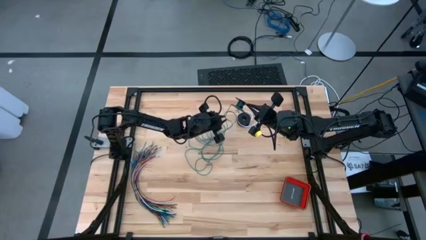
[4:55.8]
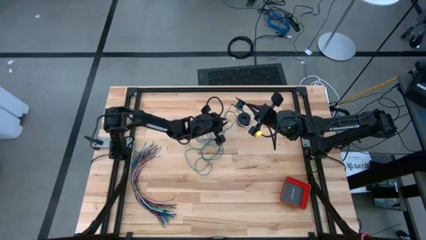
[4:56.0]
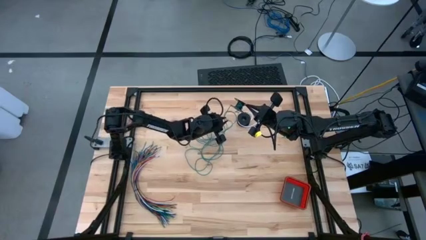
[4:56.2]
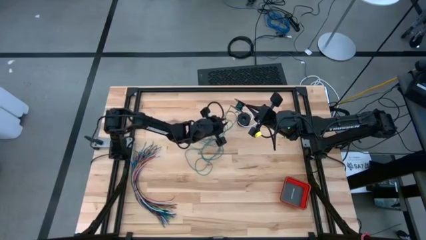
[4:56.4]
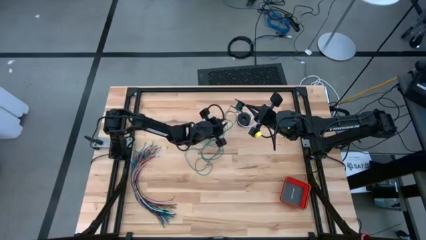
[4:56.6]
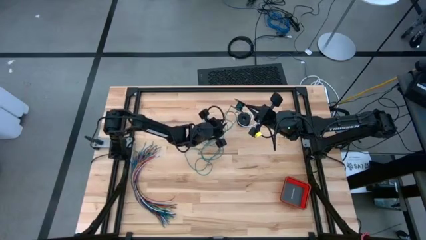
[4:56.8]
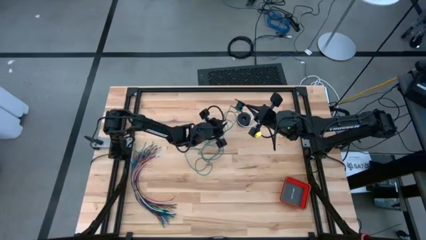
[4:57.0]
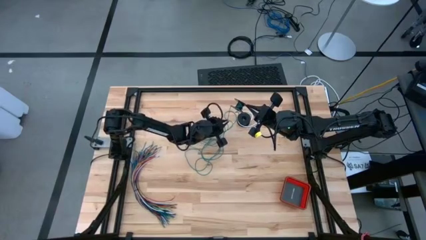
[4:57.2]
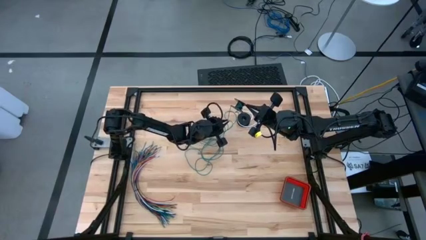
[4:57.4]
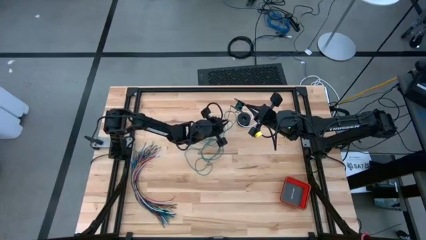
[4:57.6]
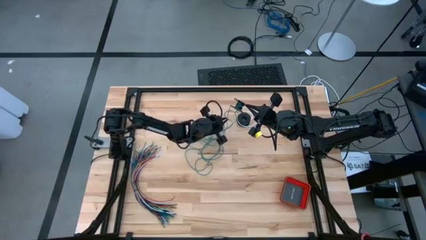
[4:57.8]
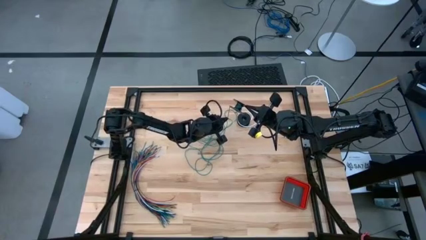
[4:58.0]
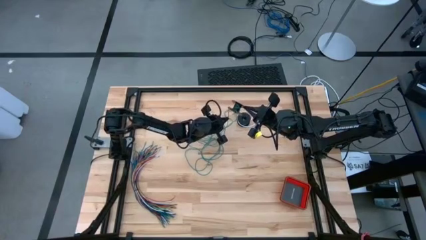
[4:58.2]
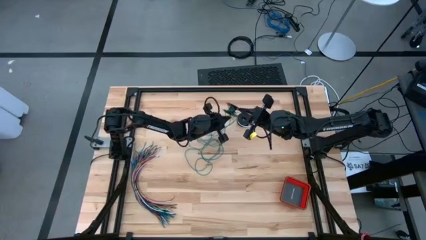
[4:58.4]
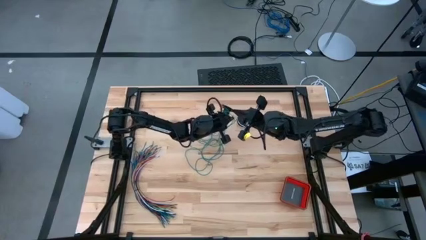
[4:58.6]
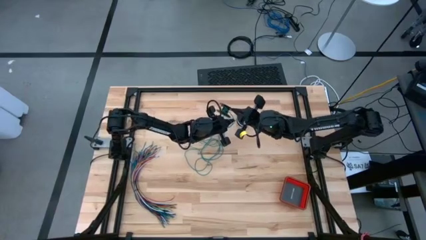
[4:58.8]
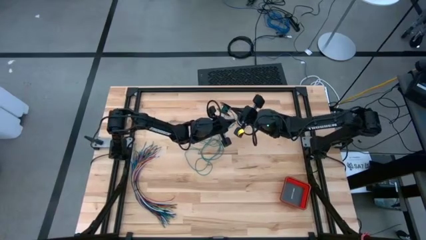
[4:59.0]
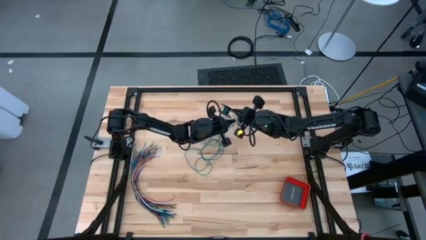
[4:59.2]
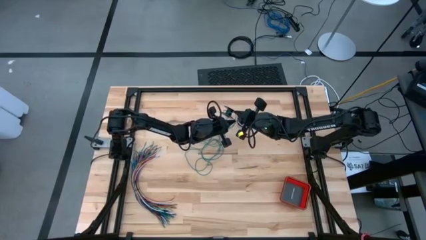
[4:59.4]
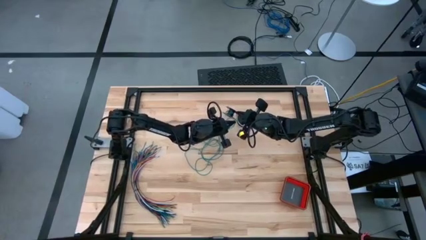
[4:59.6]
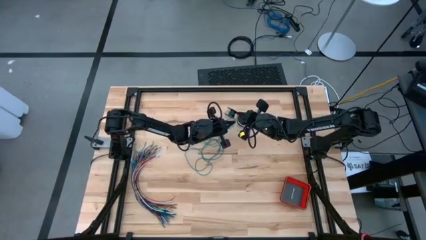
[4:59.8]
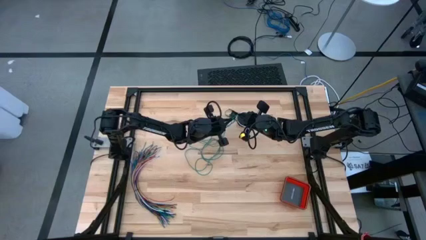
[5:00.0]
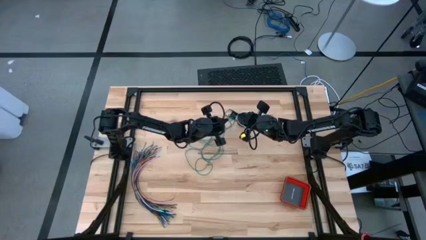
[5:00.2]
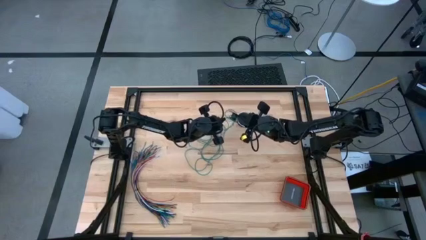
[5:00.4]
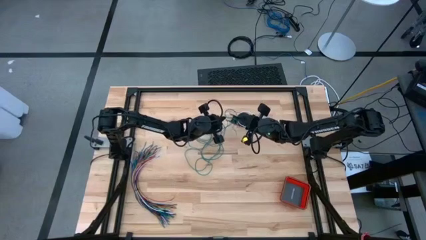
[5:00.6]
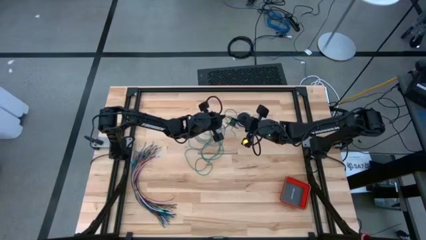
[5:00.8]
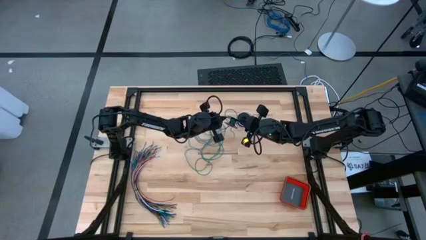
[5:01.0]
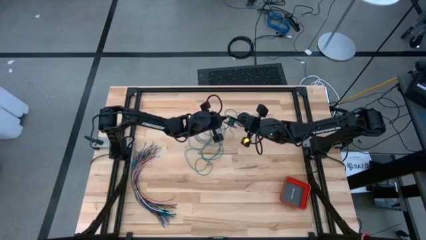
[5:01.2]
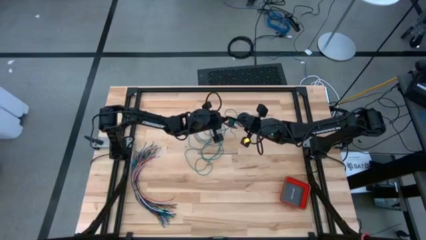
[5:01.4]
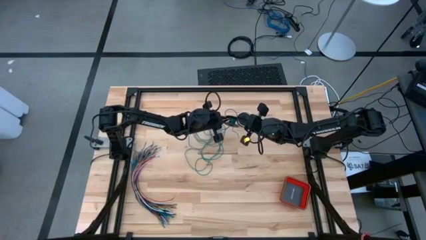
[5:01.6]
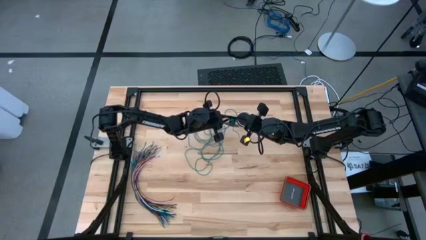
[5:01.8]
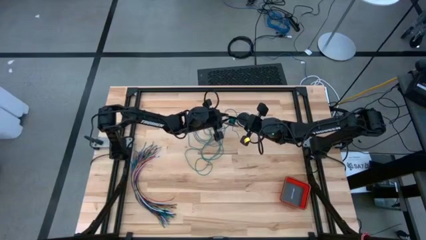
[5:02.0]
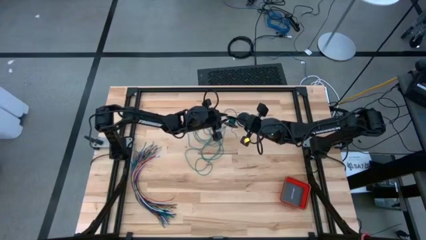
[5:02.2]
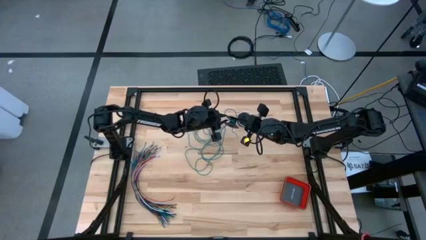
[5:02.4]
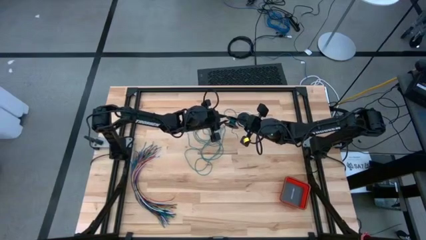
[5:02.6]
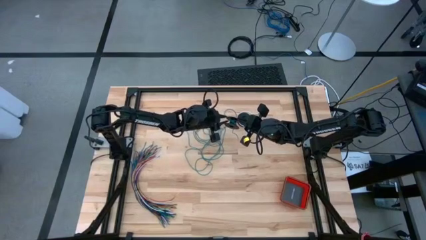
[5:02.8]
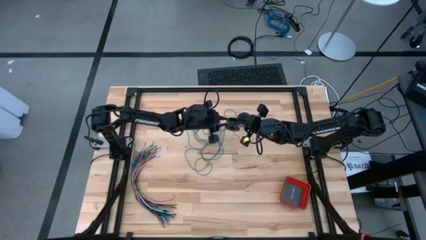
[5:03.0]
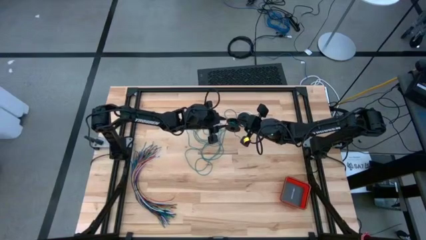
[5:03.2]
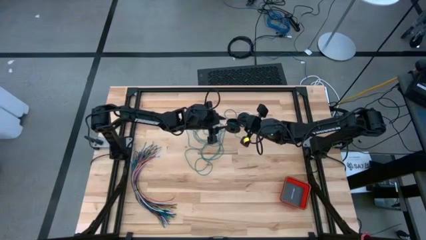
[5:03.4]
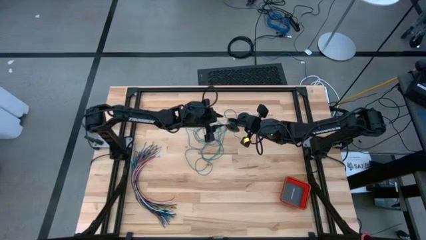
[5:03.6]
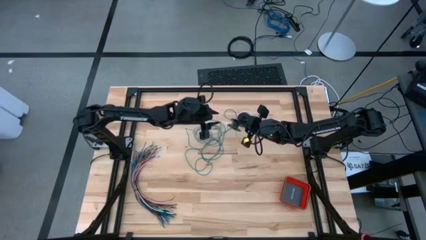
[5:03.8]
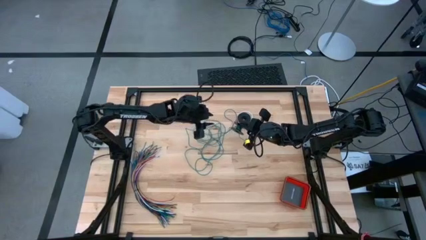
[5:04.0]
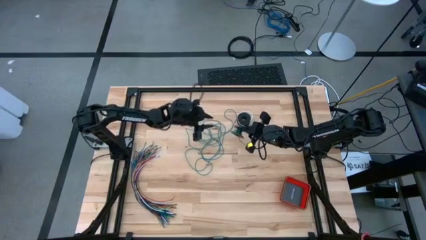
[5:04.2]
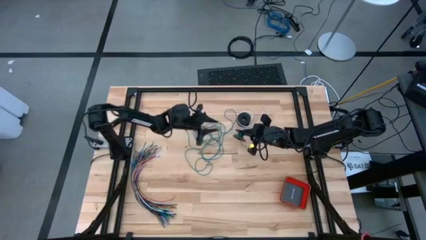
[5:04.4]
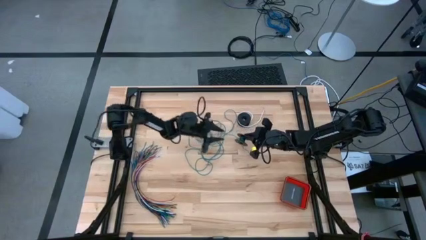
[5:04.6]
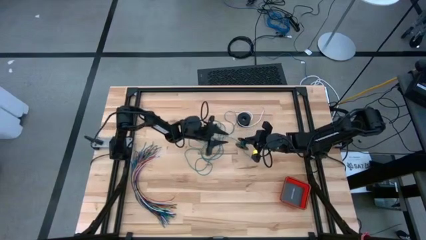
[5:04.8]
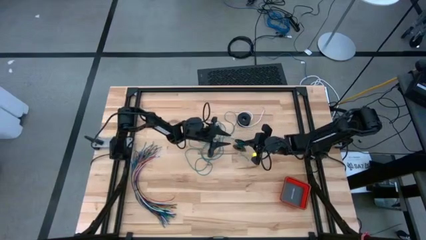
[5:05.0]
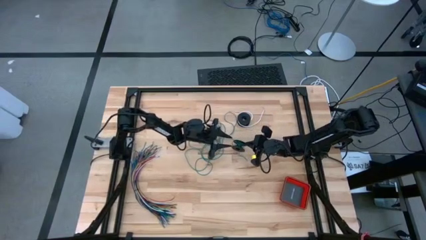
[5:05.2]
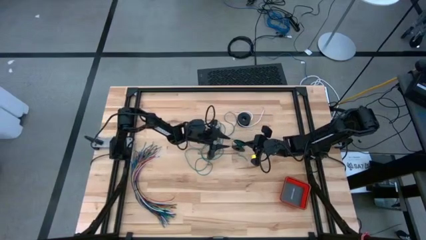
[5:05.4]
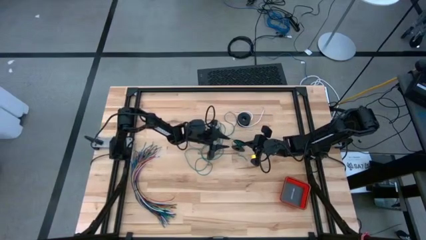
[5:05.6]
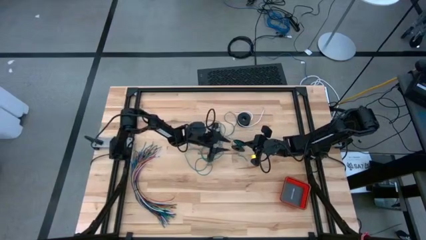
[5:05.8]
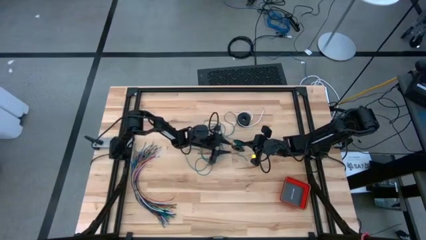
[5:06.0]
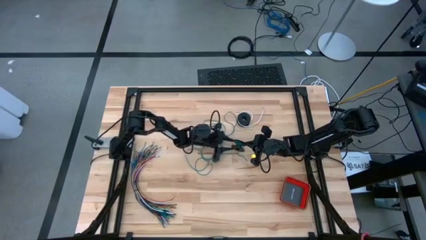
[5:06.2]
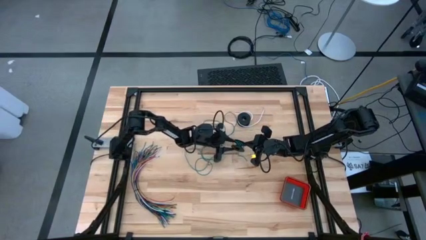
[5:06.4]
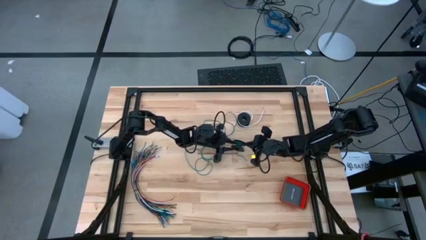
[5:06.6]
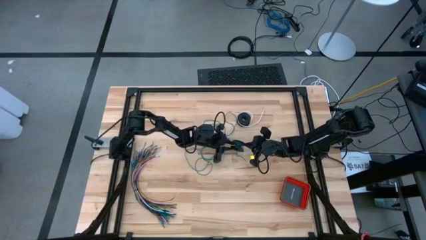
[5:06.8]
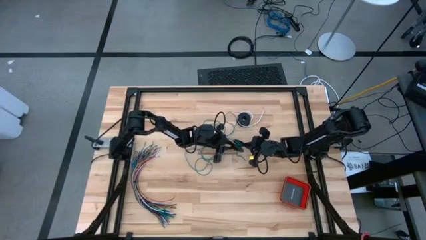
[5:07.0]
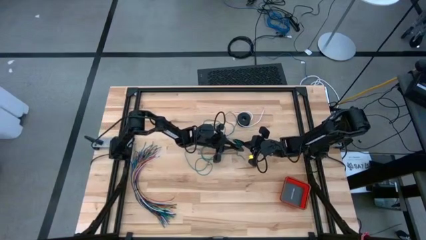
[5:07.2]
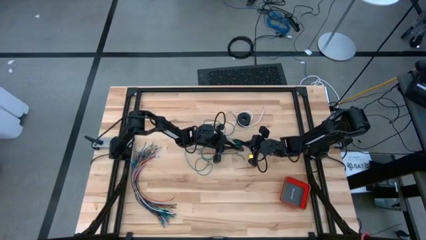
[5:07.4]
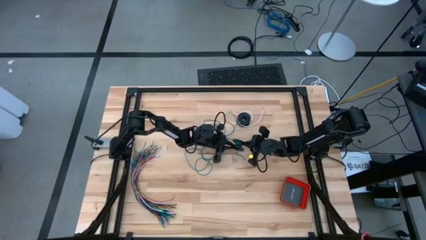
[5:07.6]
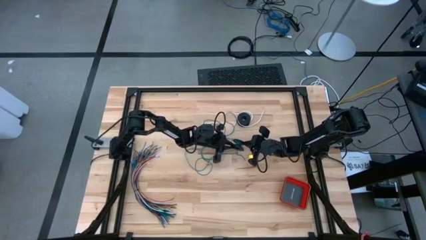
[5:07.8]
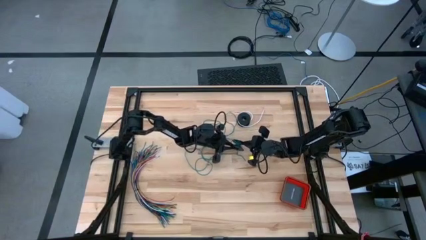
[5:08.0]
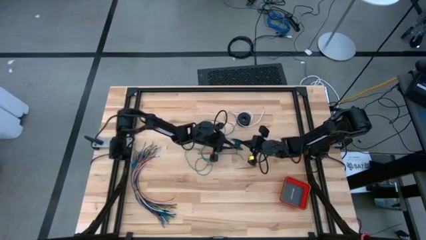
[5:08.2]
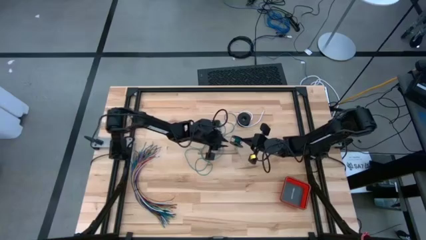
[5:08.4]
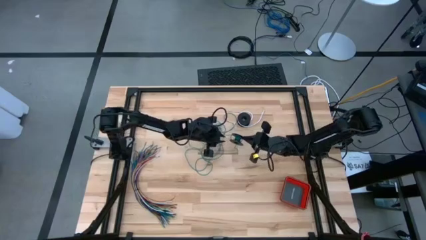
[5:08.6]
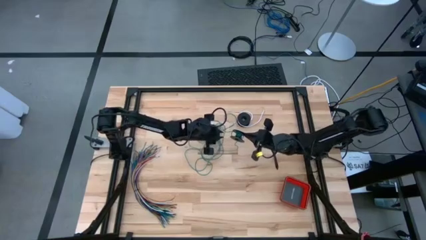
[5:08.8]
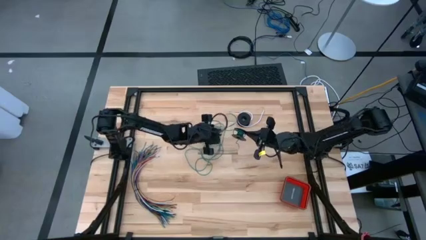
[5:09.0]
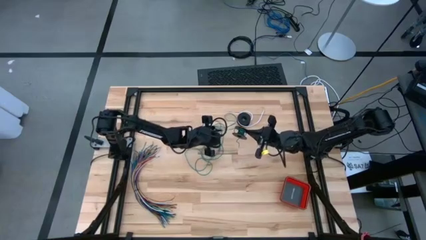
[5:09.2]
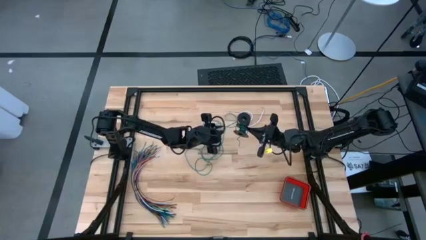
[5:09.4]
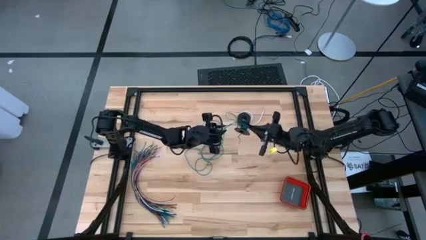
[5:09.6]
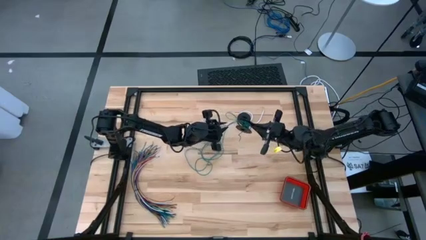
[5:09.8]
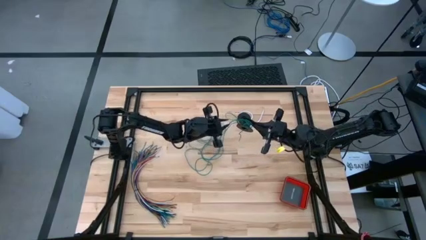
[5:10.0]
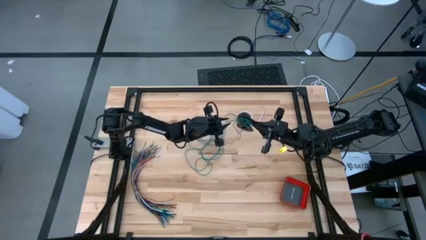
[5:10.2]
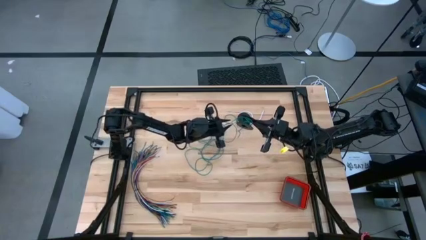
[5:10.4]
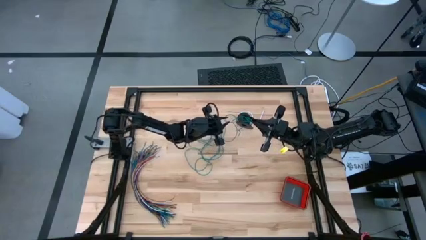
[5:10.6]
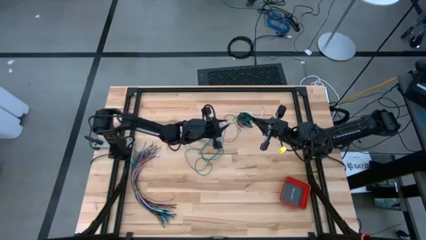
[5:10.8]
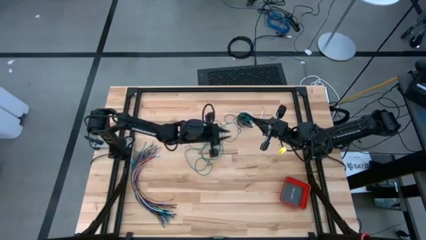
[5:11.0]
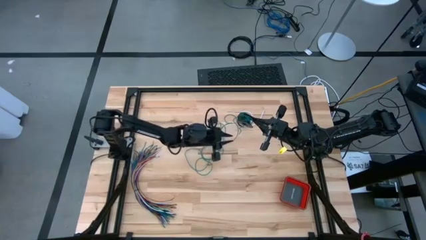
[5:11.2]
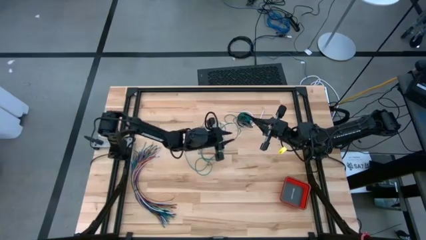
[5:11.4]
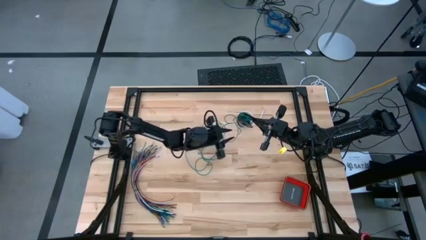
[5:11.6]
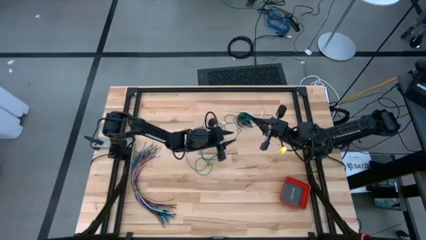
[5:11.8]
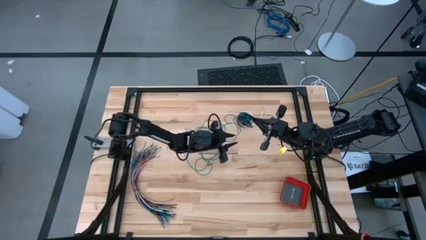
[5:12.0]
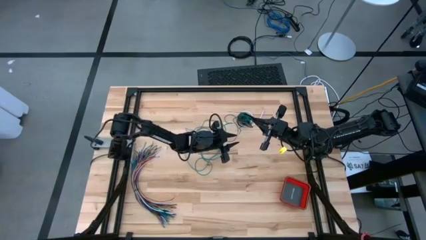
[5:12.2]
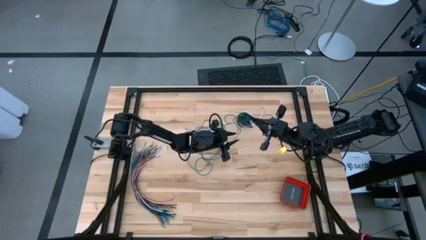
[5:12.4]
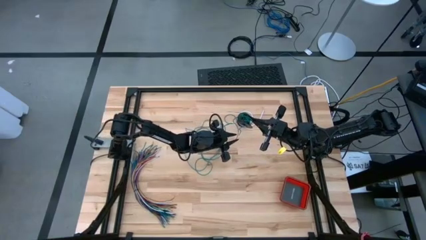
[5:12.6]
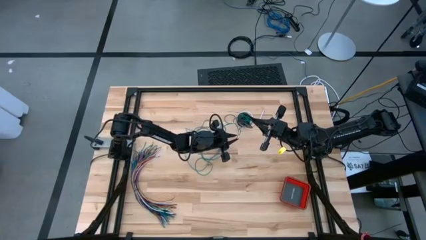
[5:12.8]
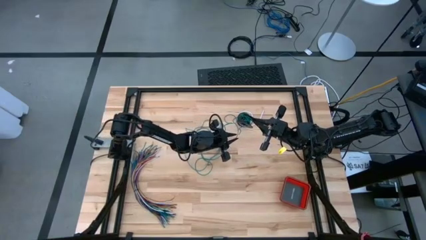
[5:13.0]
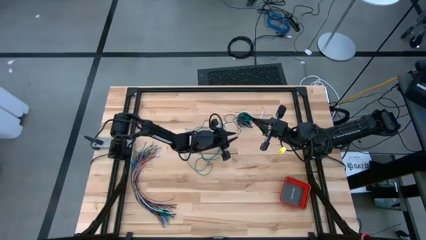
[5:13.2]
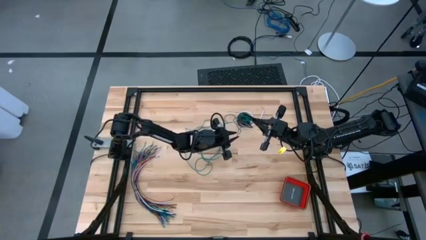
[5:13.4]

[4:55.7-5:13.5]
Task: Coil cords
Coil the green wire onto the spool
